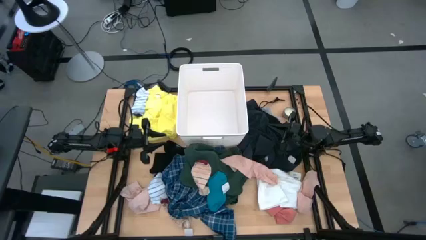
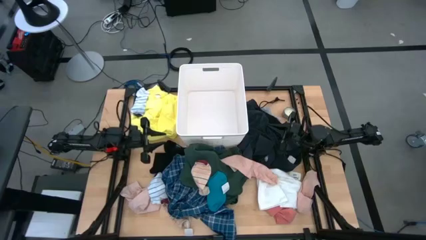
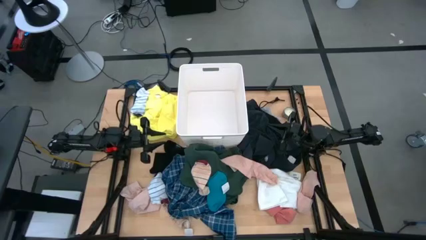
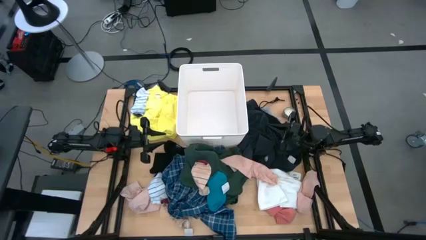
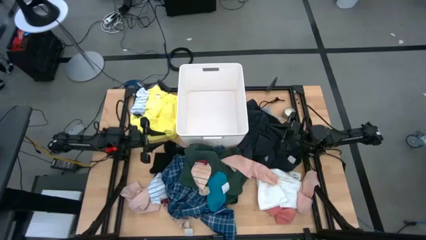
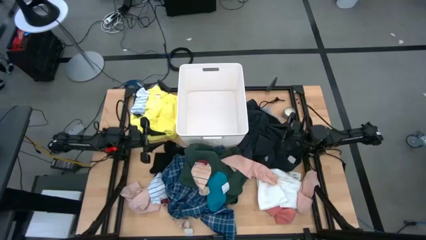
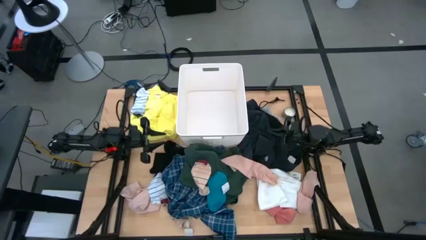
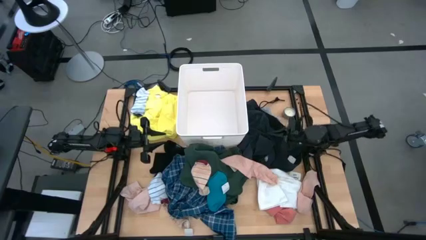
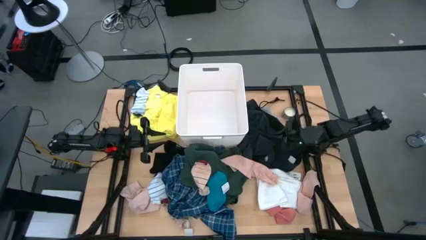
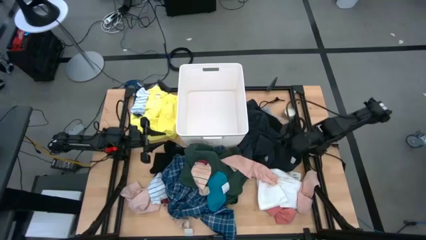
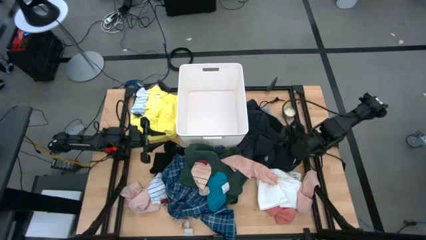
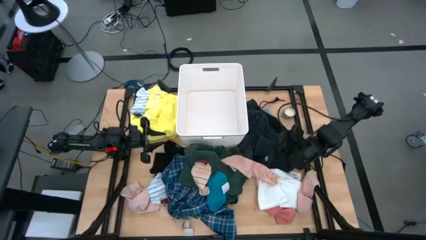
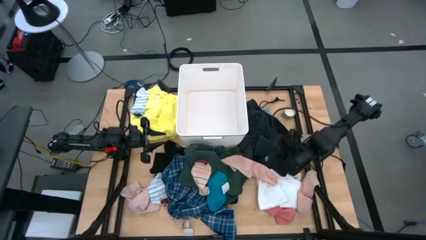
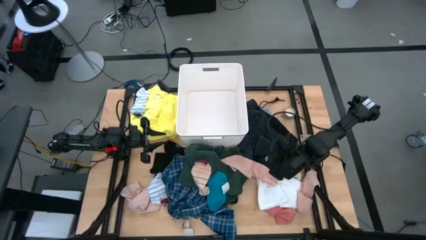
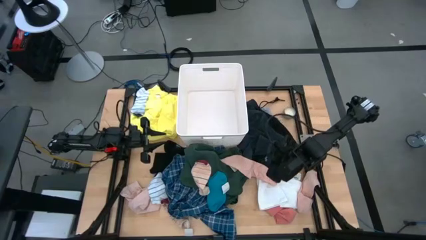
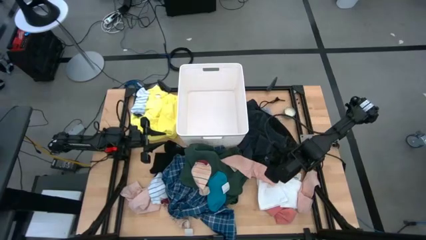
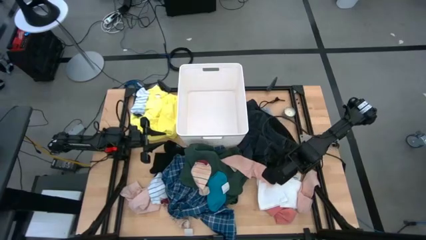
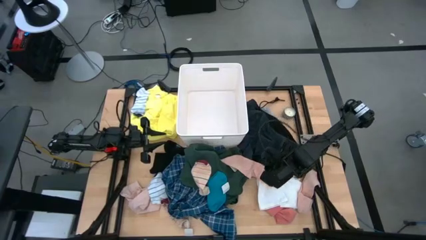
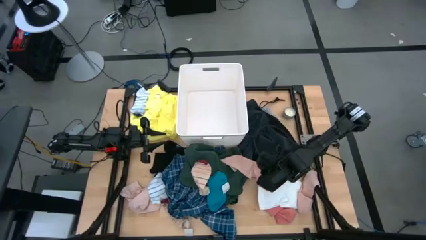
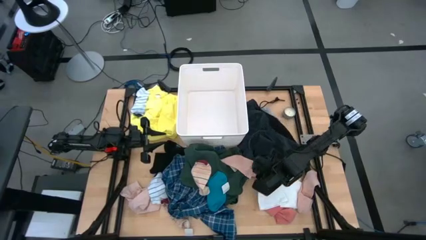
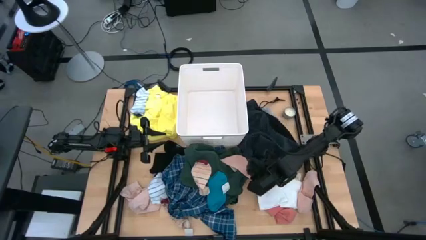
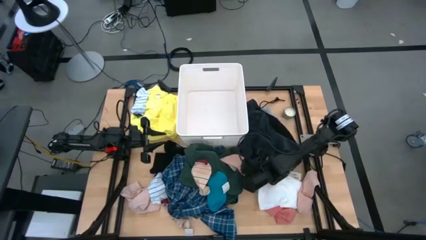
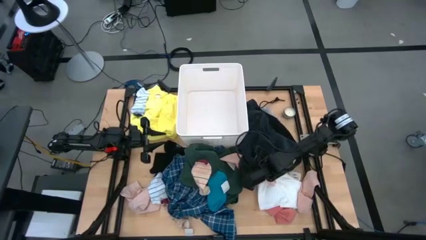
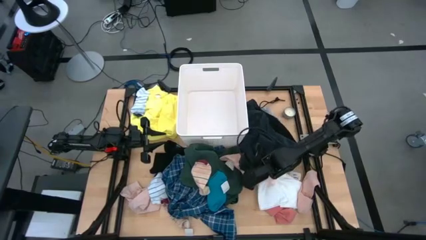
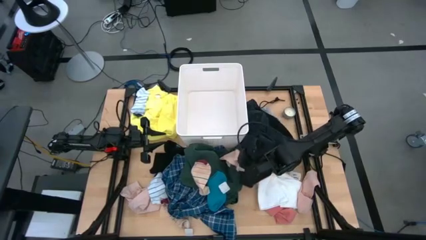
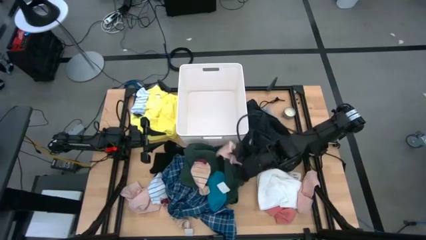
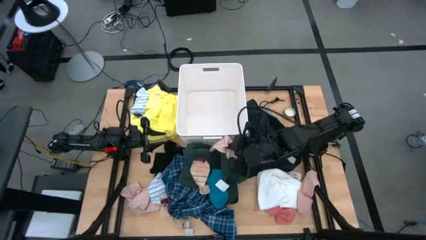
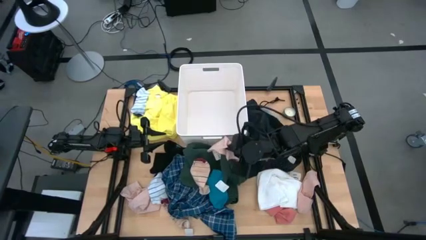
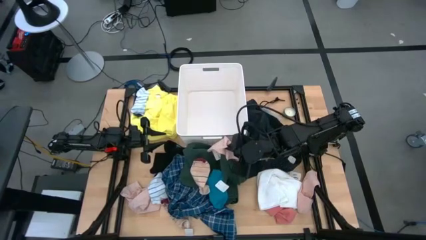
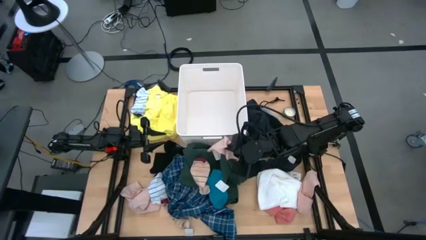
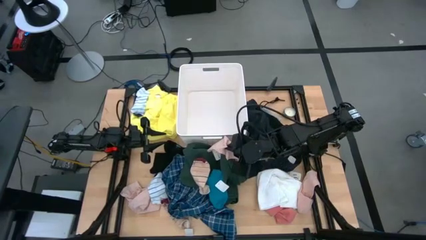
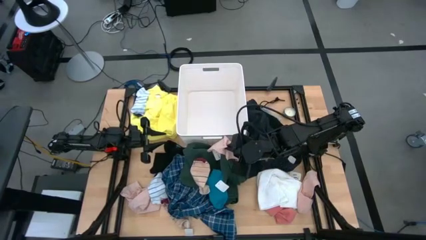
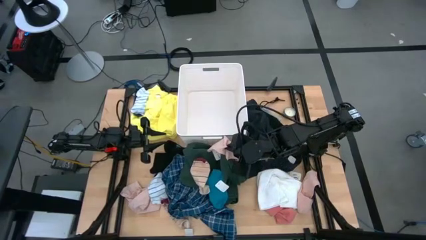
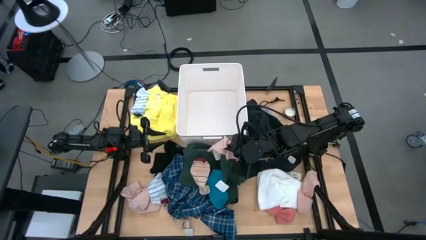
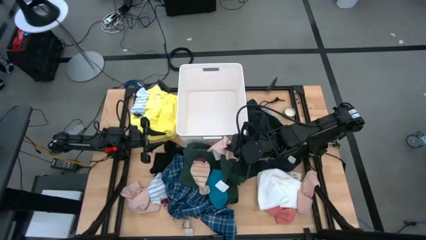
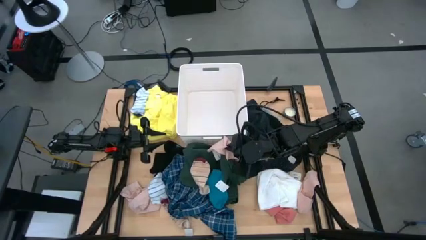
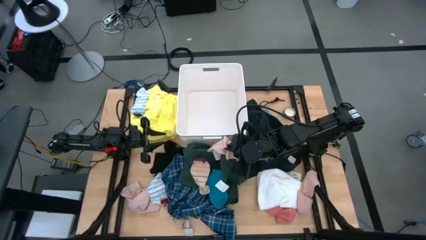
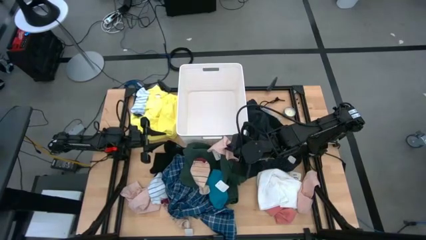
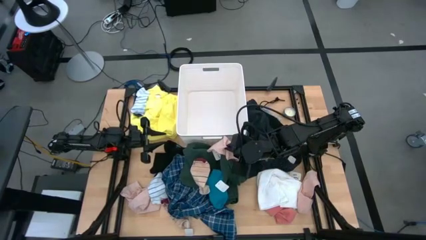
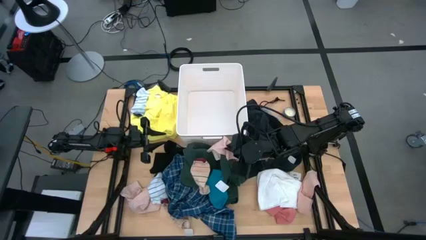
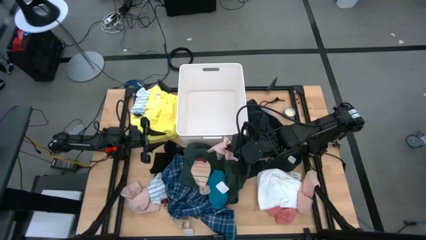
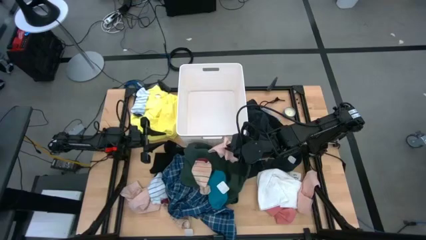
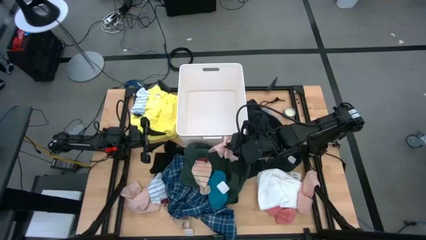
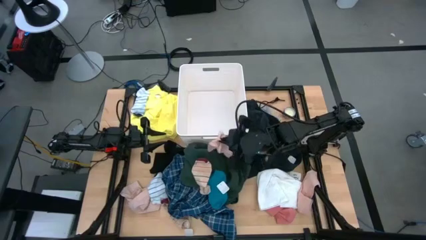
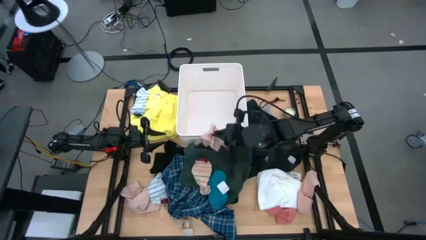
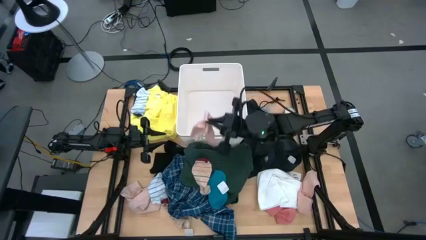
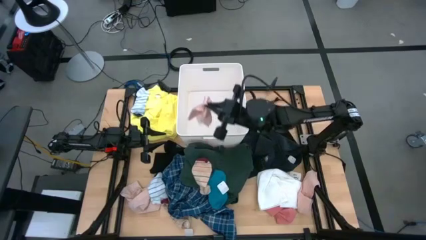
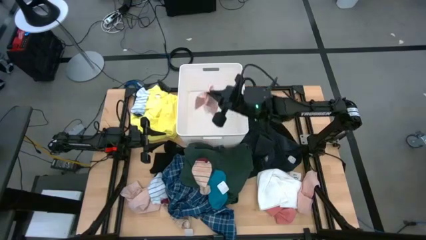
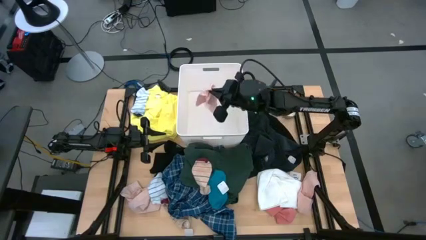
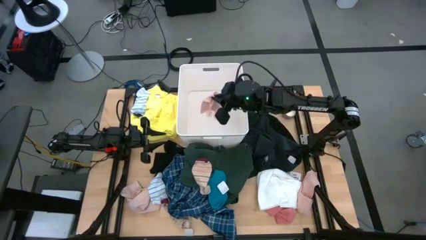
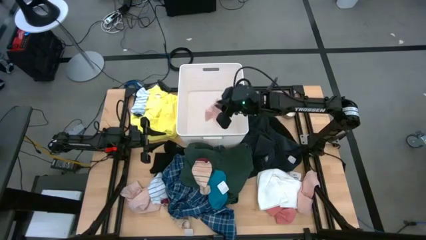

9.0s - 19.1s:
Task: Sort clothes
Put the pink underwear into the white laundry bin

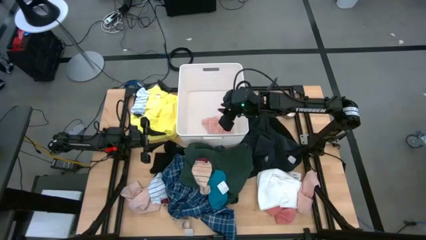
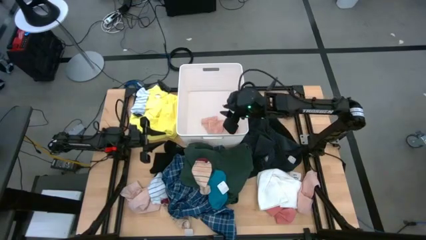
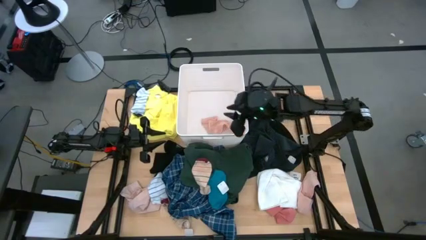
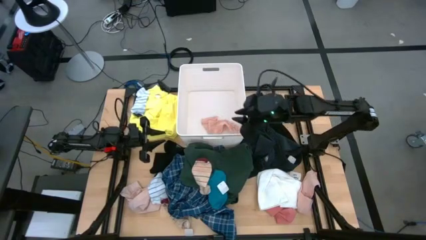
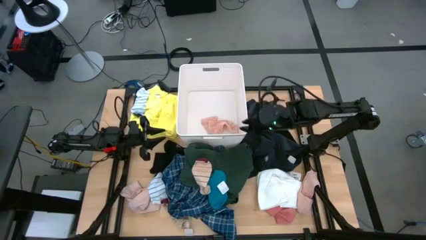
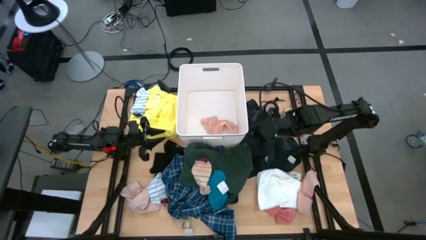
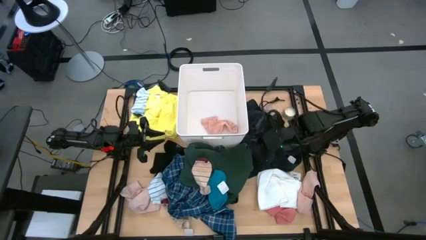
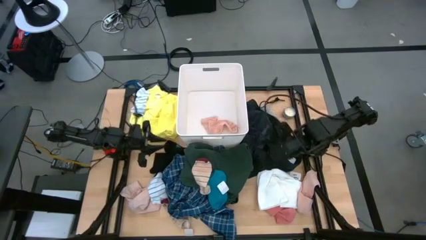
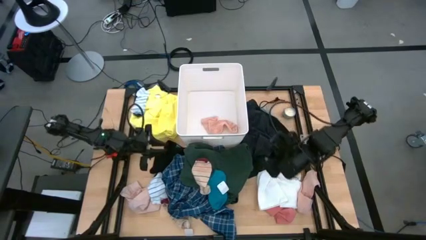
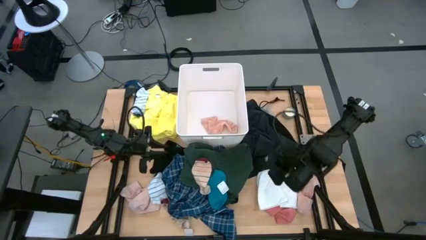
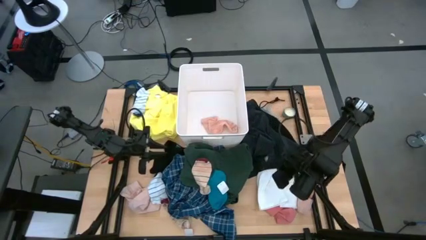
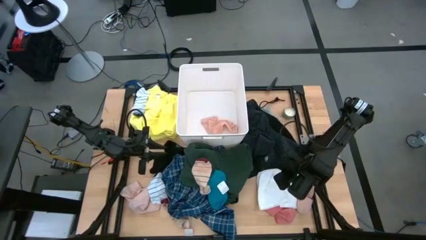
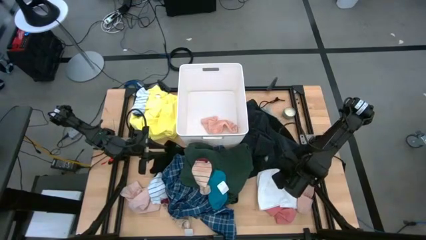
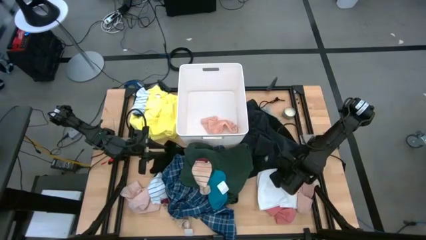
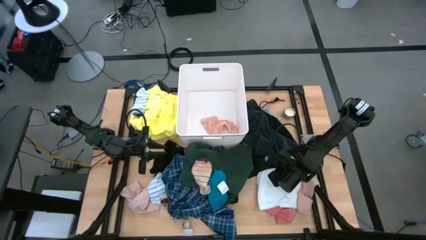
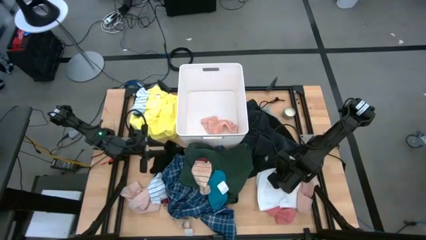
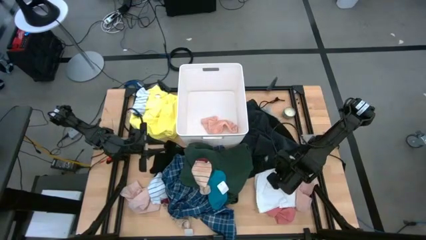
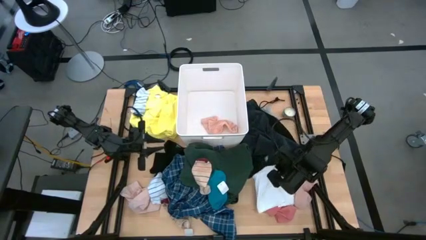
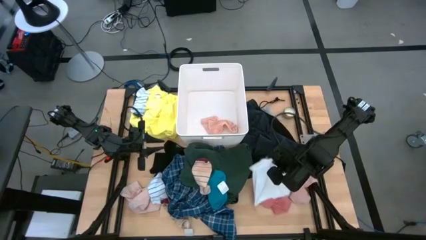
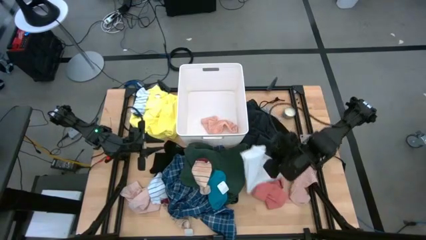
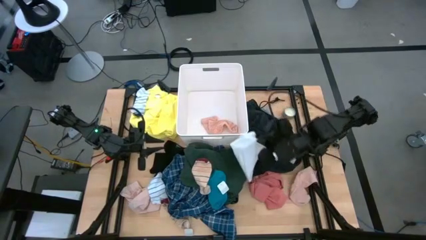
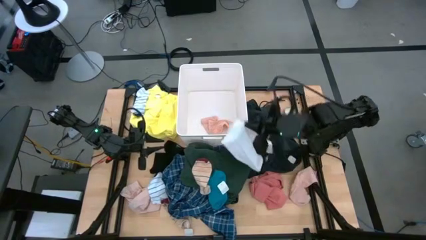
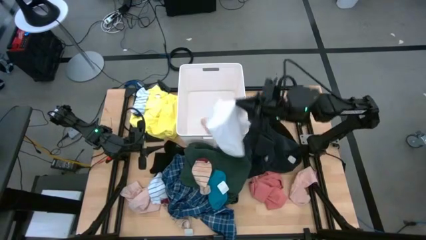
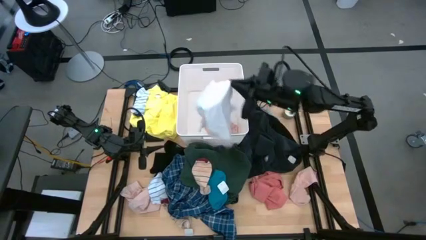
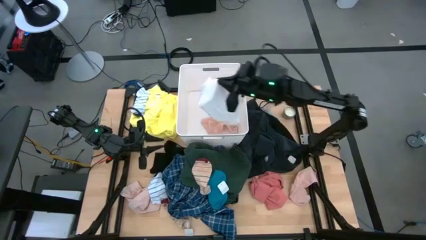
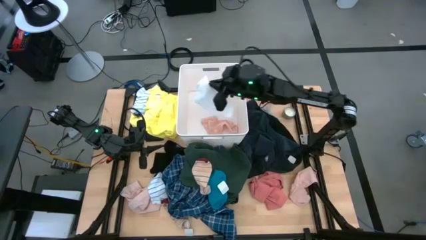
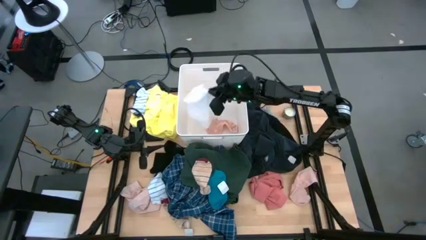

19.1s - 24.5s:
Put the white cloth into the laundry bin
